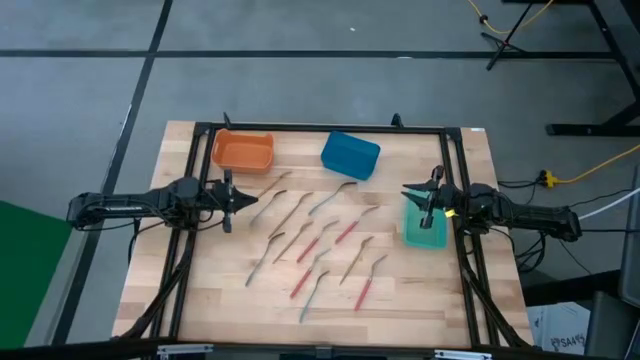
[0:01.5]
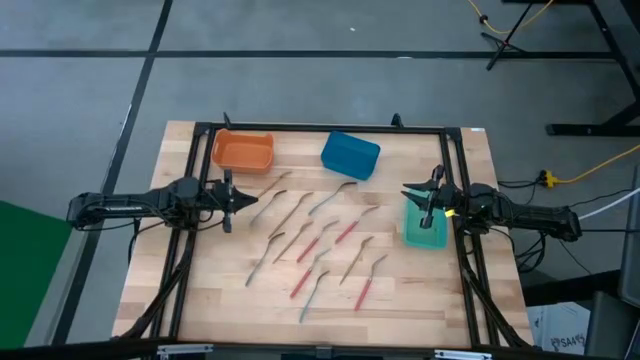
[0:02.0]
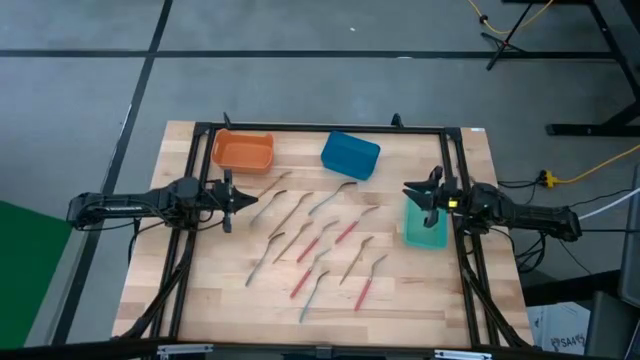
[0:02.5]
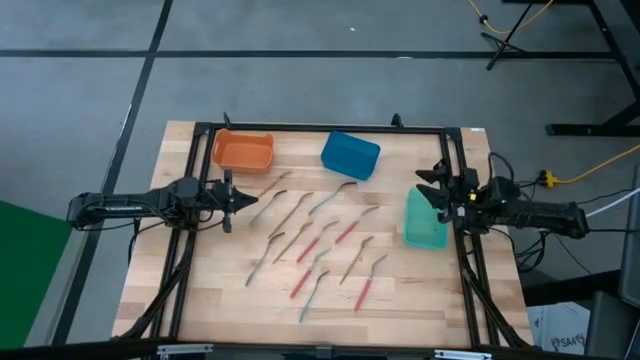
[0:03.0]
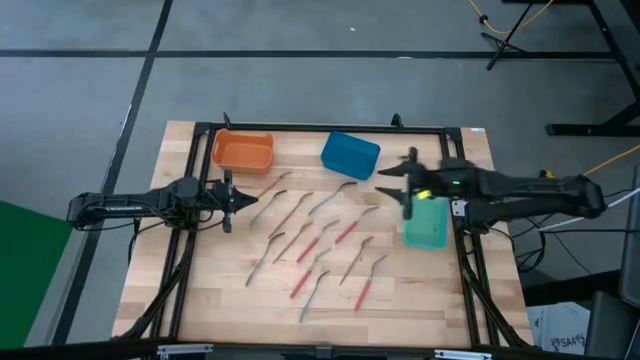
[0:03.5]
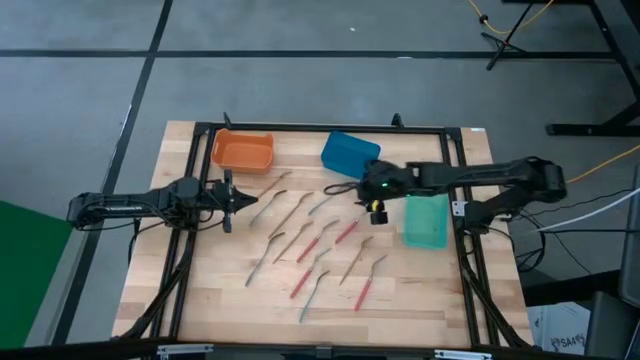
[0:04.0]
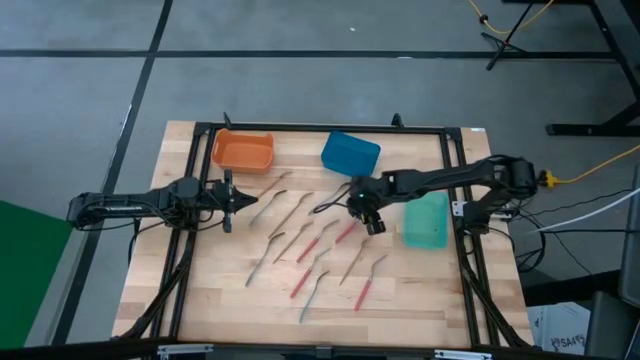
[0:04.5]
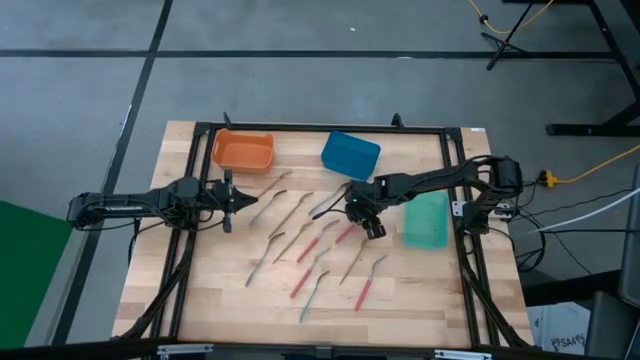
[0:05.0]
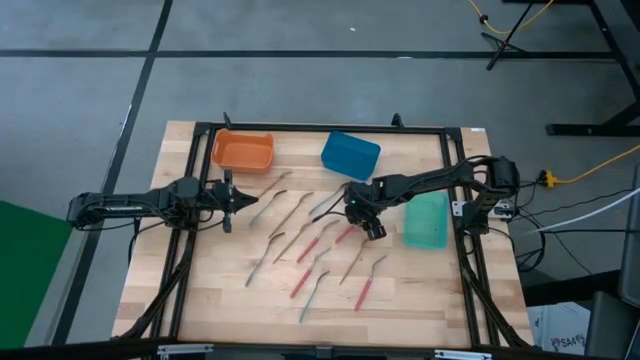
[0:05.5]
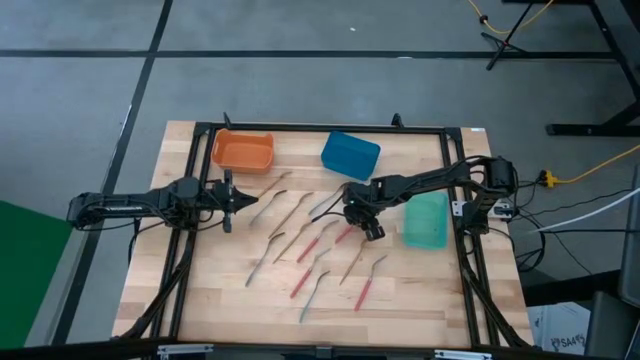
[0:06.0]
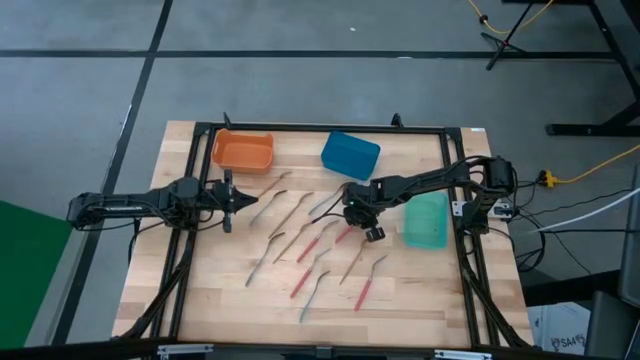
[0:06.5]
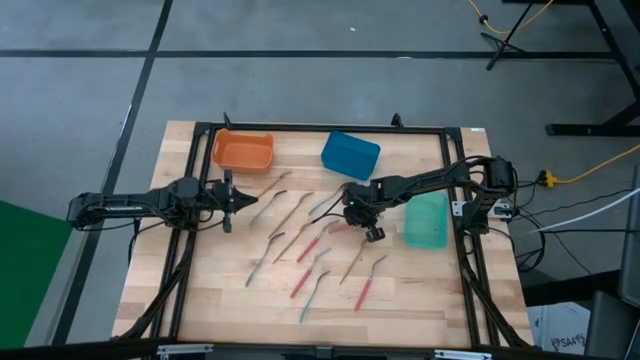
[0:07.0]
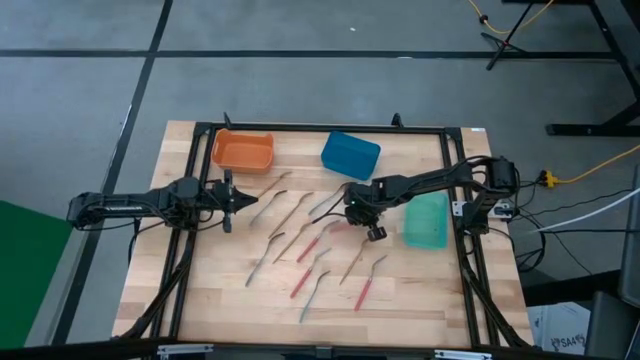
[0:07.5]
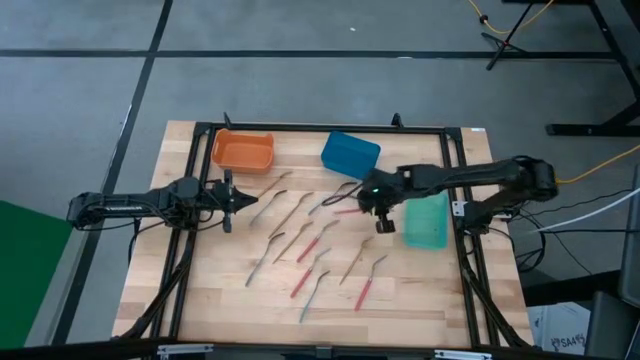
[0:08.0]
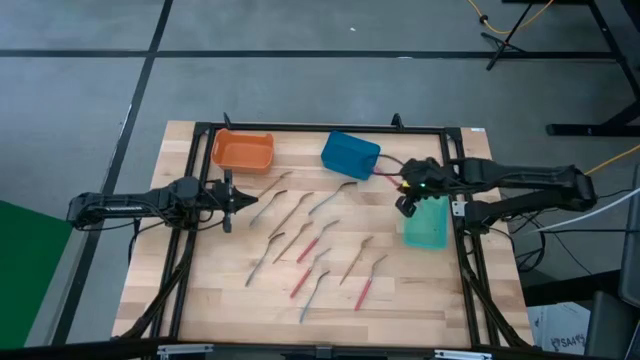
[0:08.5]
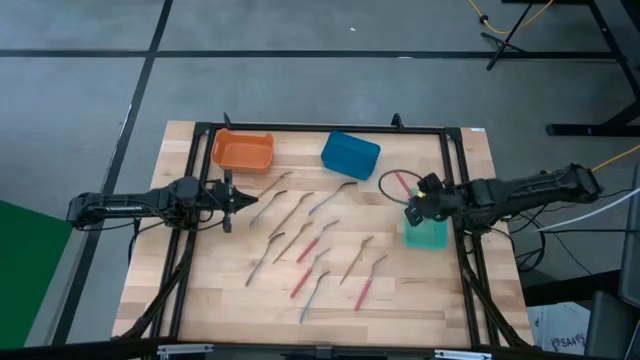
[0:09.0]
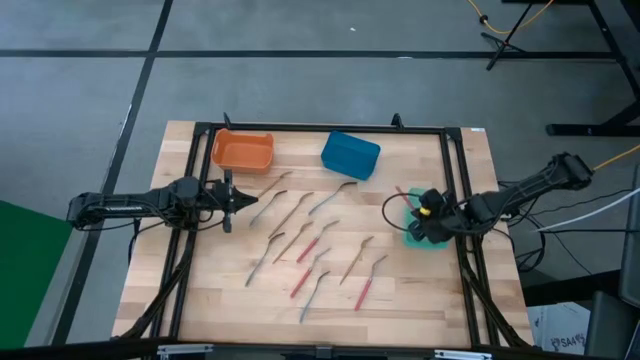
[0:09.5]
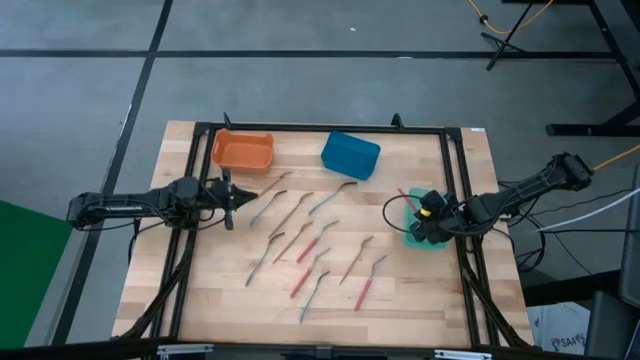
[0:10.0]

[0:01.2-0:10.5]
Task: Sort silverware by color (type)
Put the pink fork into the green bin

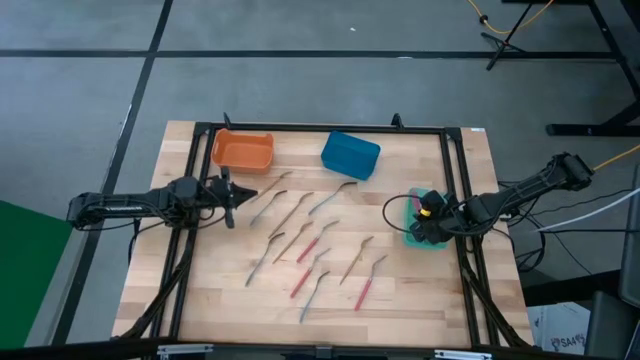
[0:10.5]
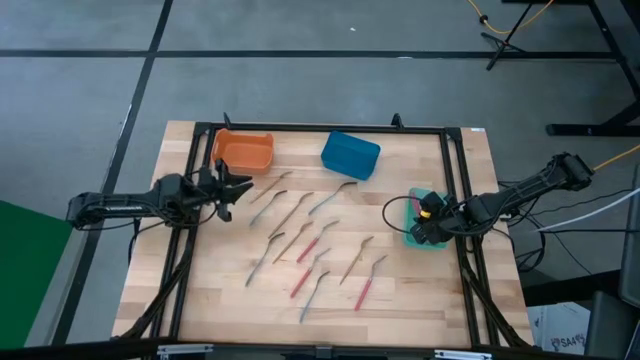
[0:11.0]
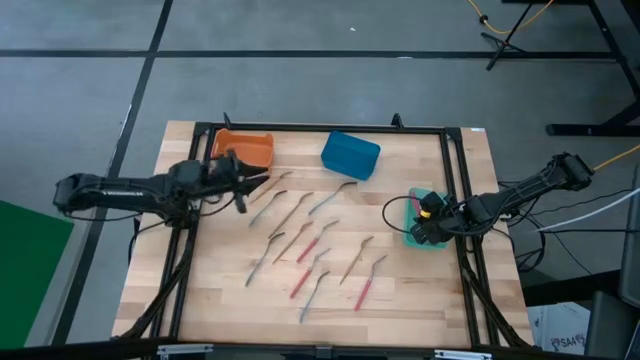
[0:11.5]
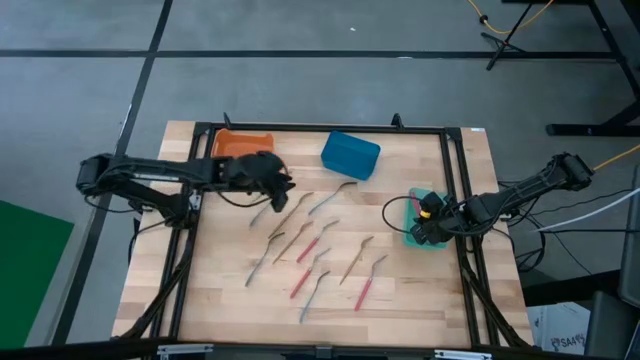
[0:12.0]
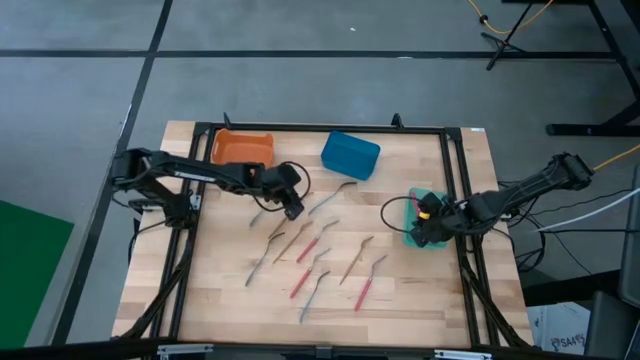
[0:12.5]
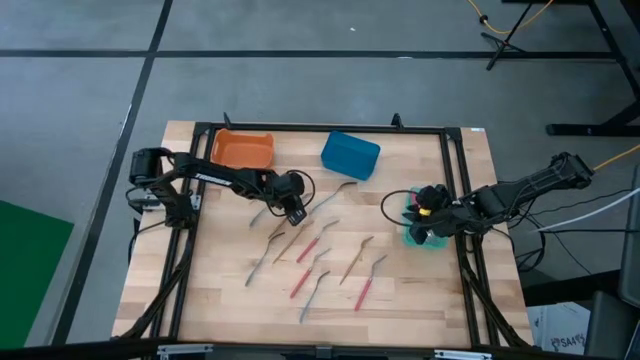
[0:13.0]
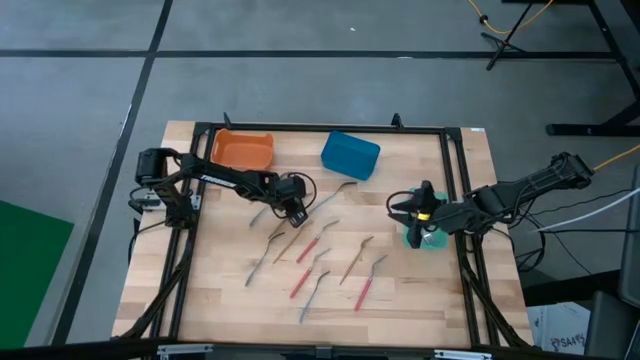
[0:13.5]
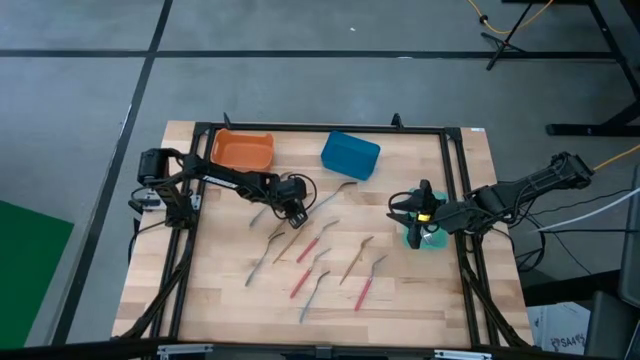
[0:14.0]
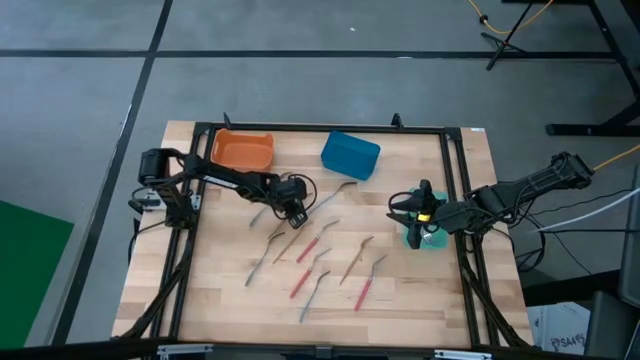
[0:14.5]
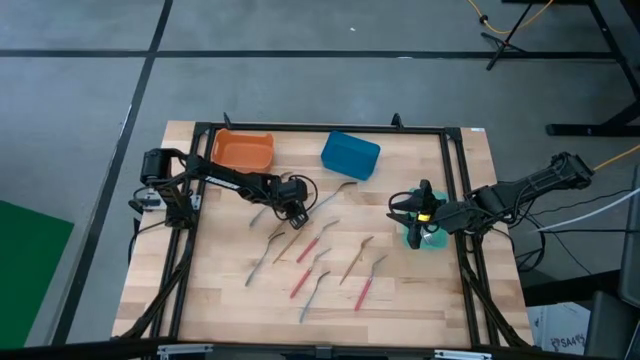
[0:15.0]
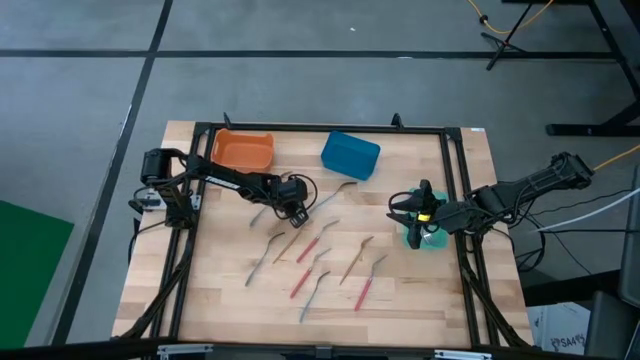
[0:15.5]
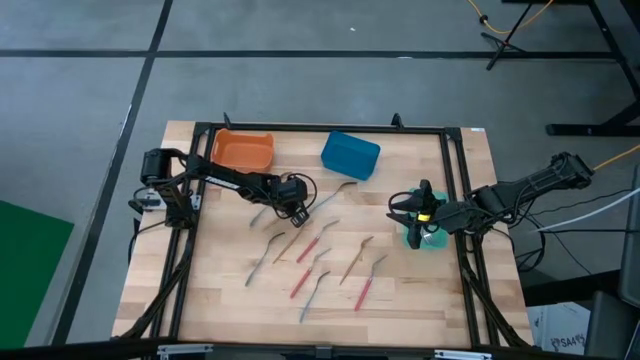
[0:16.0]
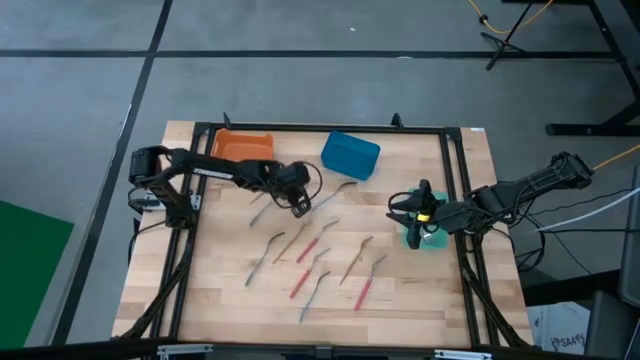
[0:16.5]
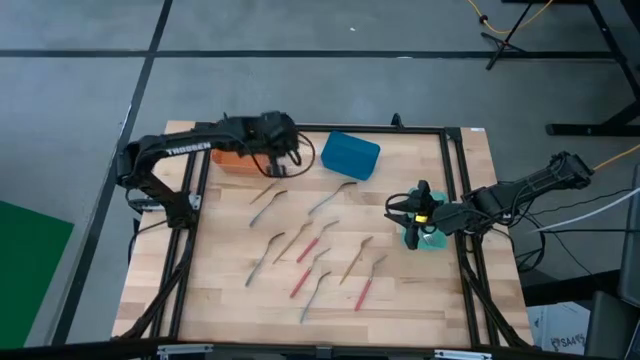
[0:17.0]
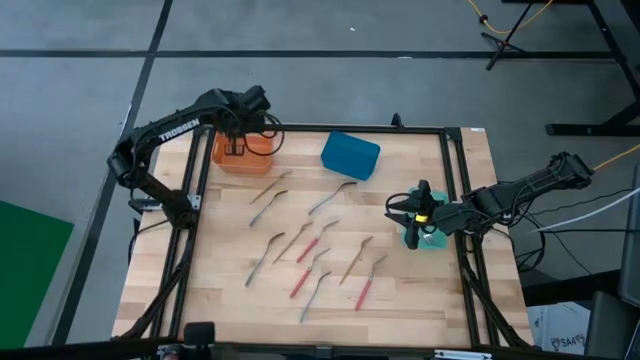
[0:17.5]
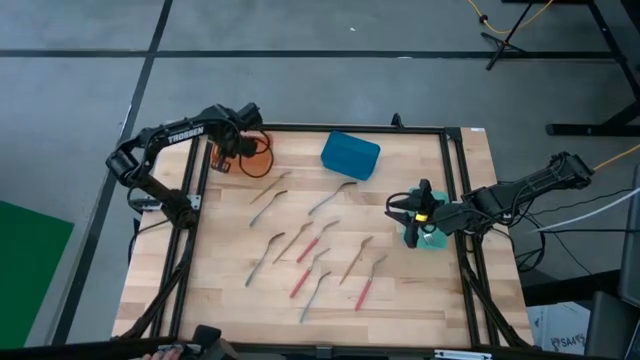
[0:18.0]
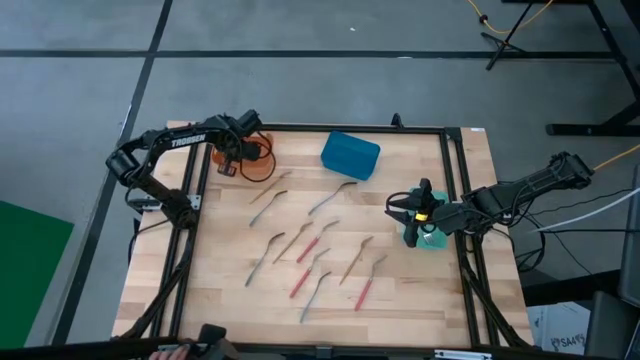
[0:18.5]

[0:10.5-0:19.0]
Put the gold fork into the orange bin

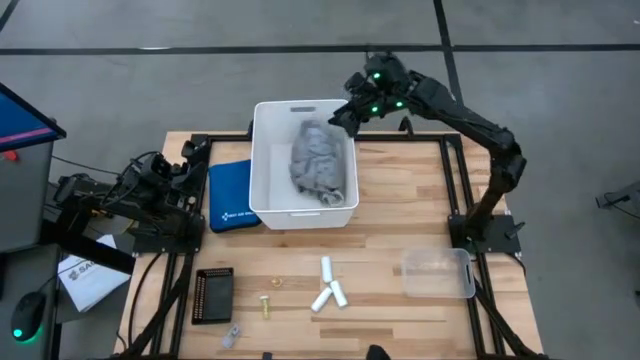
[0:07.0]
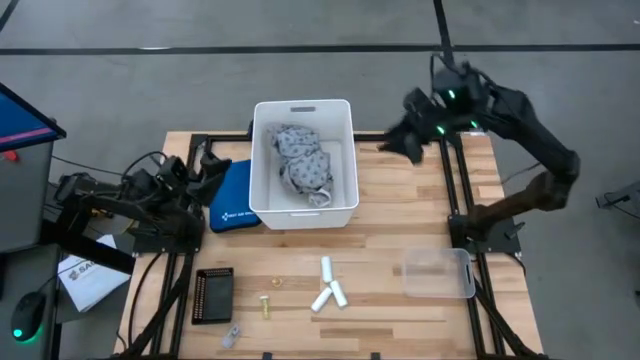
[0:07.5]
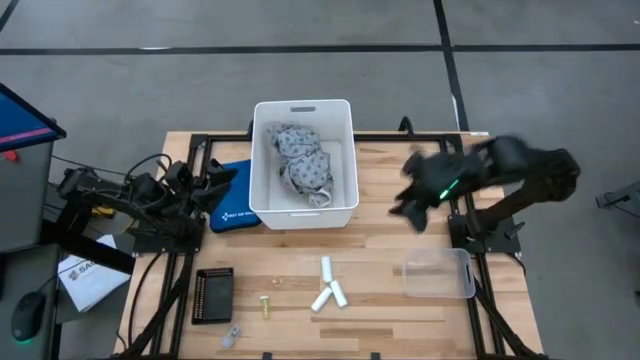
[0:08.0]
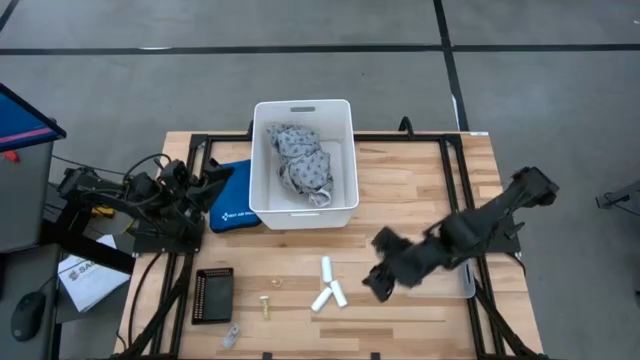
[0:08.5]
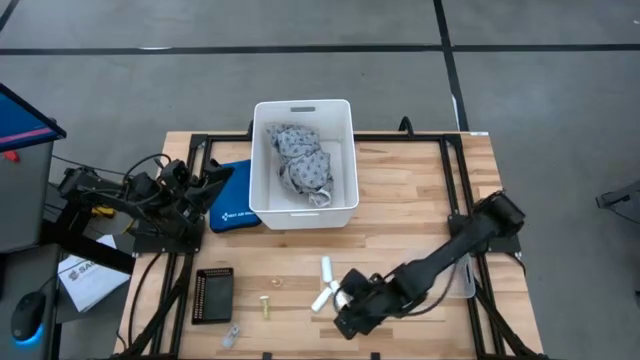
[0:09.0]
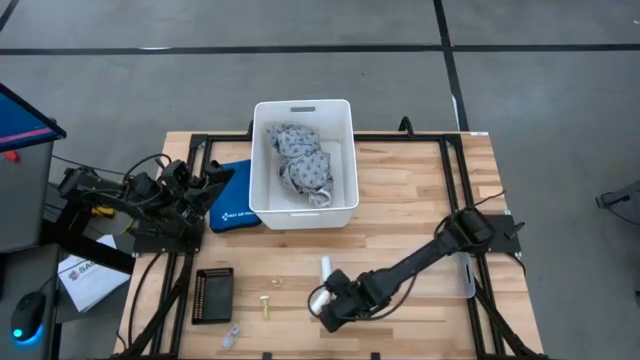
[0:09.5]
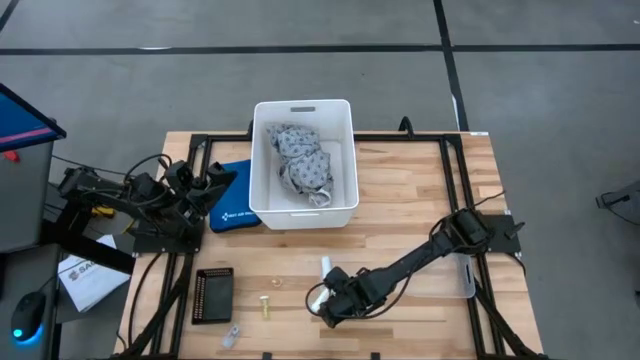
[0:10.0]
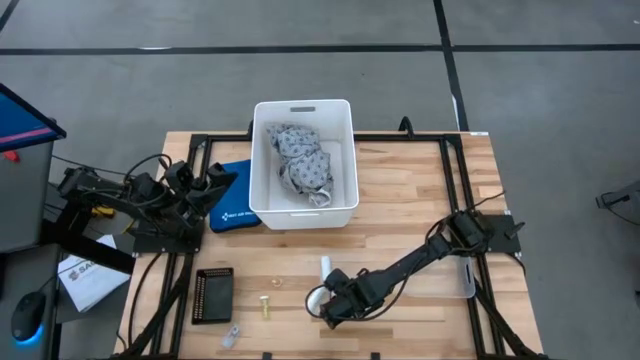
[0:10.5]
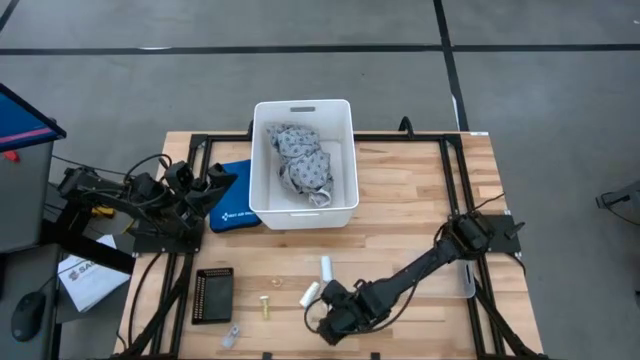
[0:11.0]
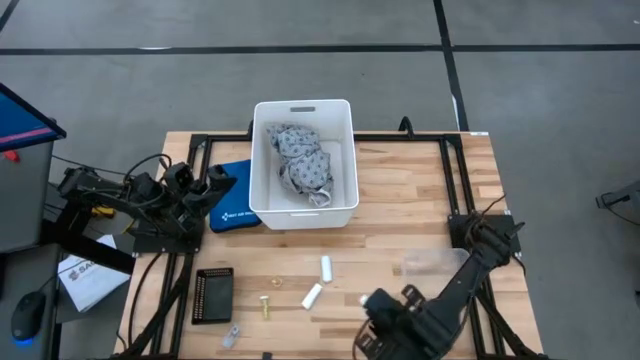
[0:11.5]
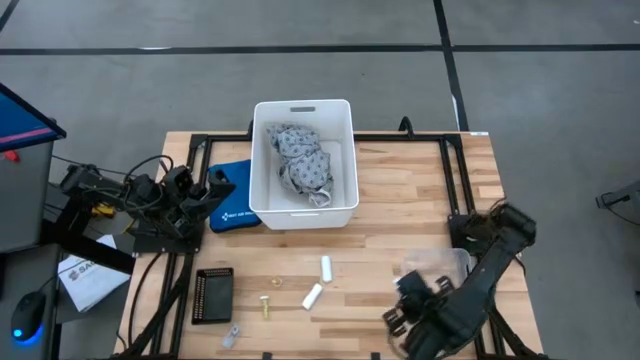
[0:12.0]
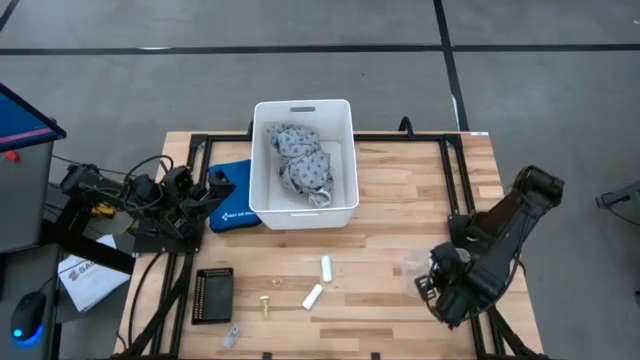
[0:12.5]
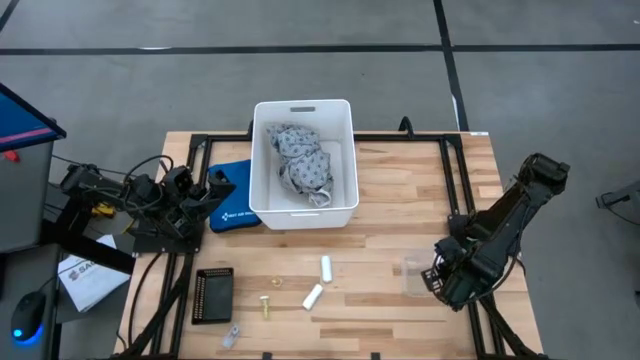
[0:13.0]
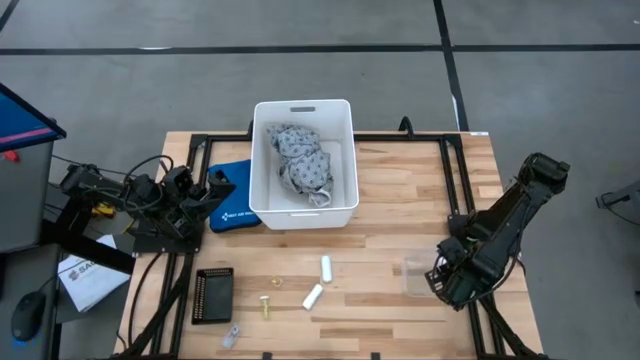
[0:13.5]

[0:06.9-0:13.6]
Task: Pick & Place Medicine items
Put the bottom right rolled gauze into the transparent bin
